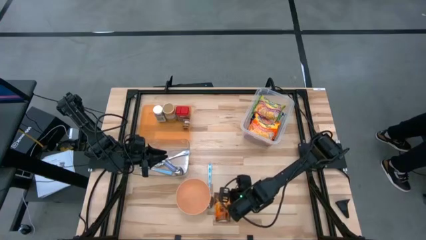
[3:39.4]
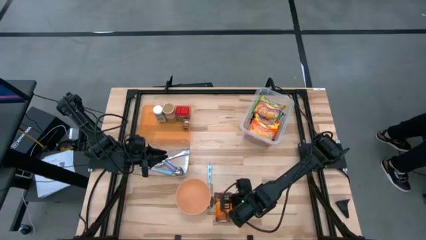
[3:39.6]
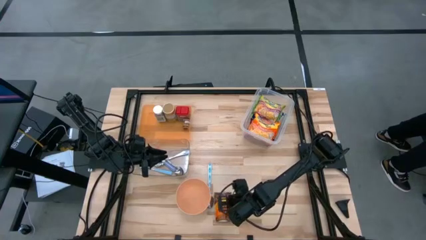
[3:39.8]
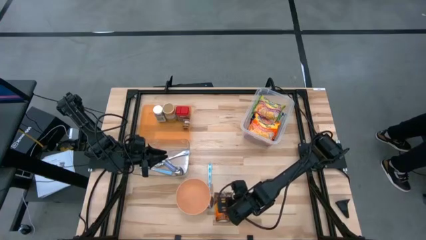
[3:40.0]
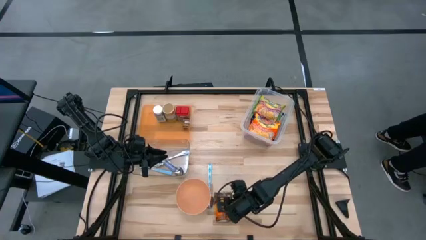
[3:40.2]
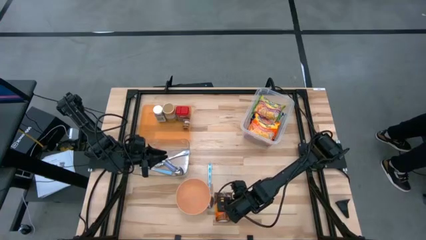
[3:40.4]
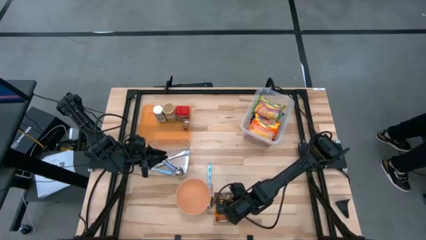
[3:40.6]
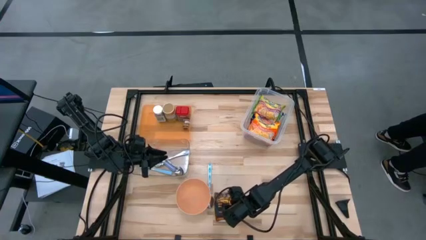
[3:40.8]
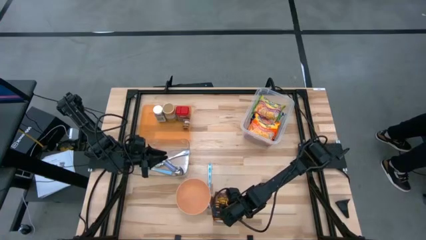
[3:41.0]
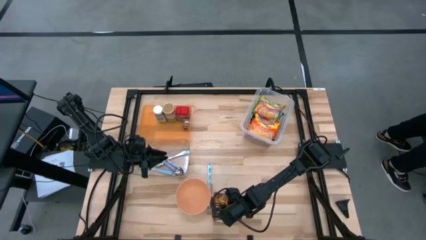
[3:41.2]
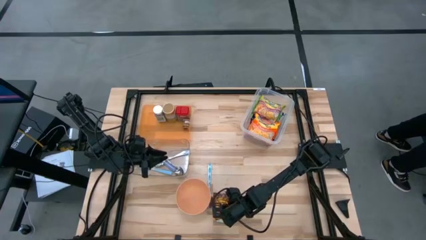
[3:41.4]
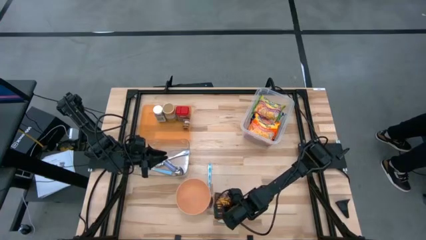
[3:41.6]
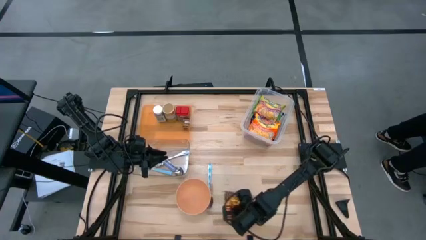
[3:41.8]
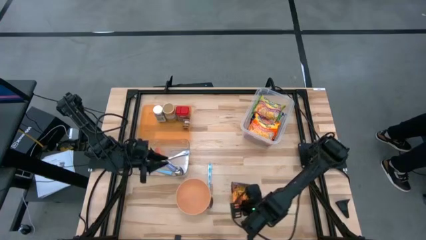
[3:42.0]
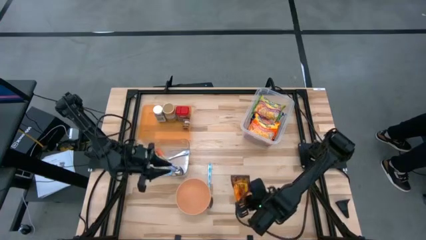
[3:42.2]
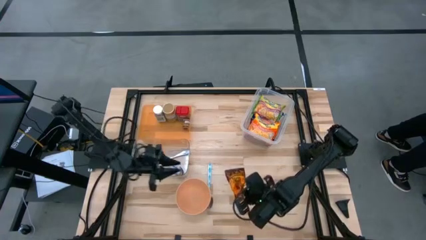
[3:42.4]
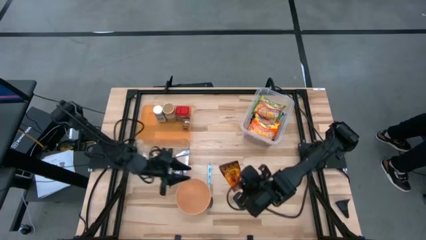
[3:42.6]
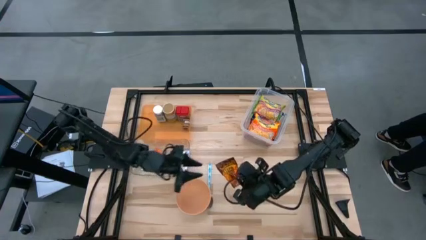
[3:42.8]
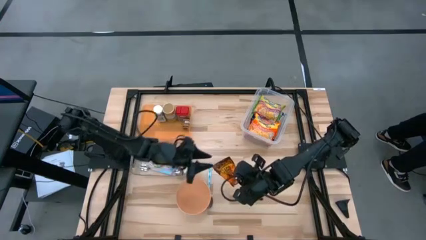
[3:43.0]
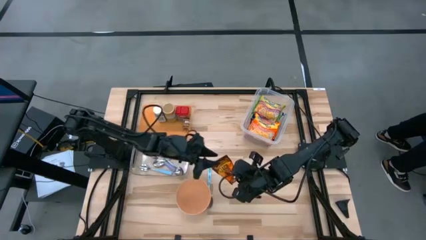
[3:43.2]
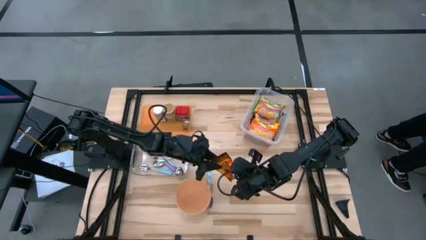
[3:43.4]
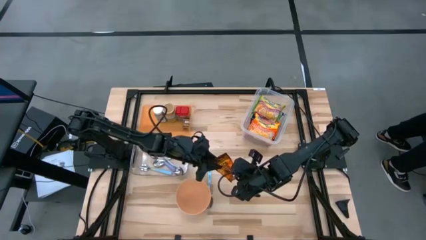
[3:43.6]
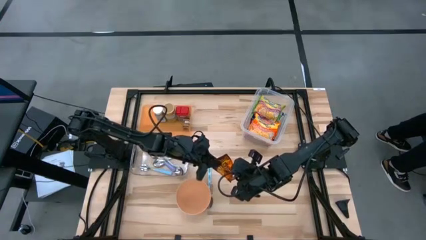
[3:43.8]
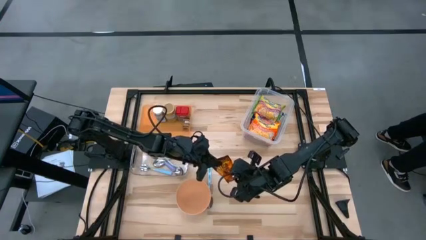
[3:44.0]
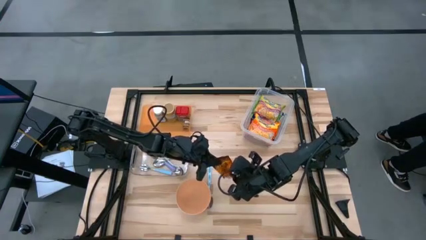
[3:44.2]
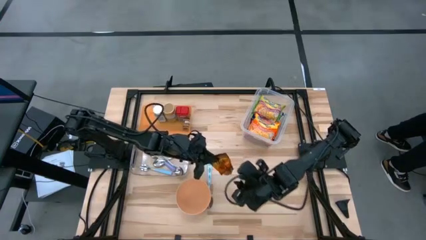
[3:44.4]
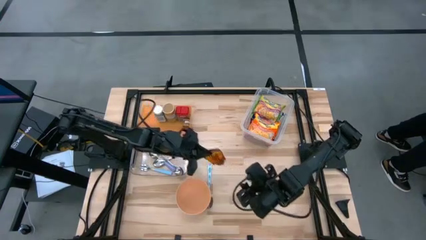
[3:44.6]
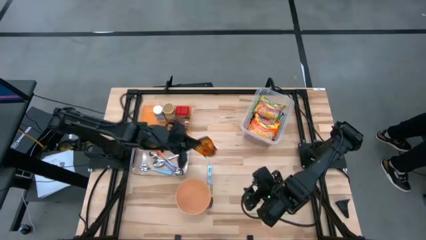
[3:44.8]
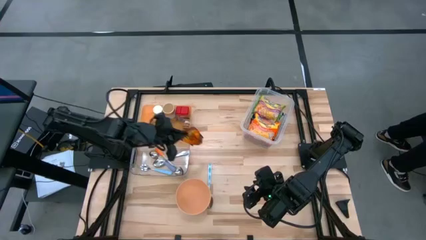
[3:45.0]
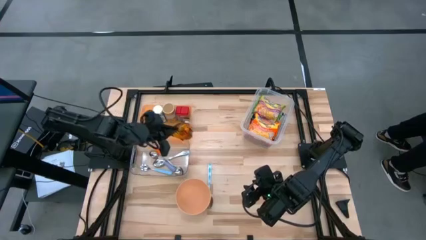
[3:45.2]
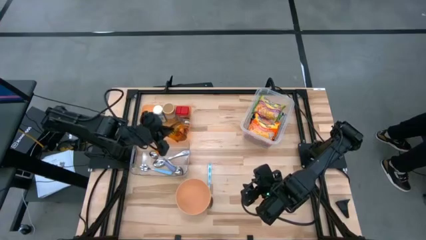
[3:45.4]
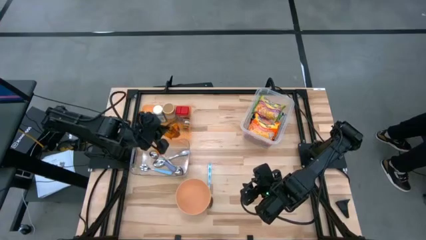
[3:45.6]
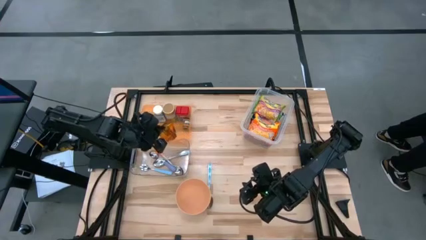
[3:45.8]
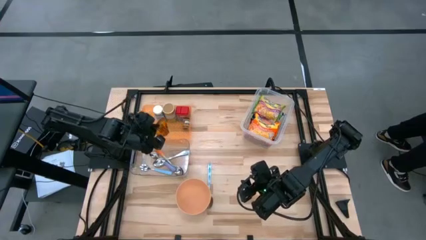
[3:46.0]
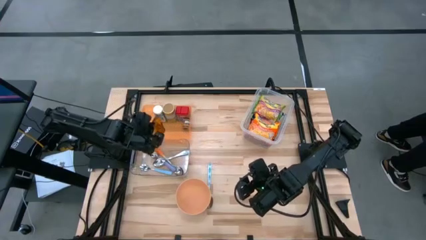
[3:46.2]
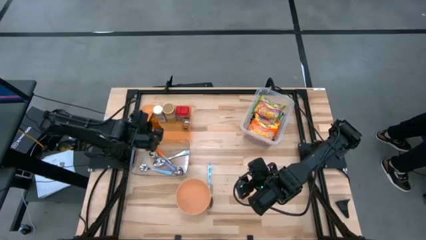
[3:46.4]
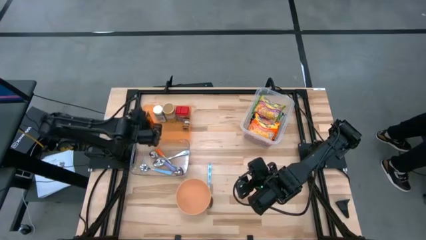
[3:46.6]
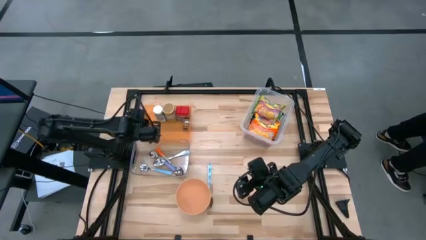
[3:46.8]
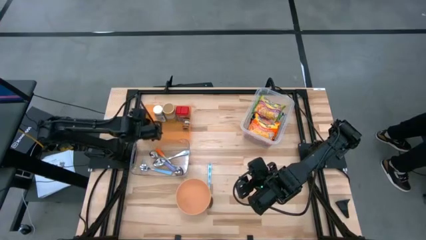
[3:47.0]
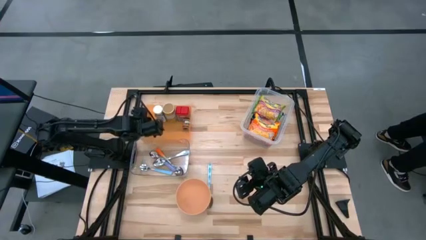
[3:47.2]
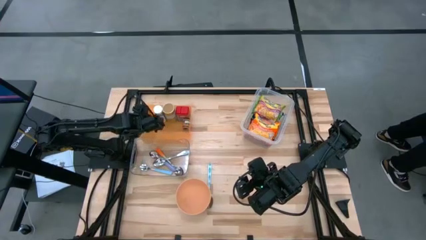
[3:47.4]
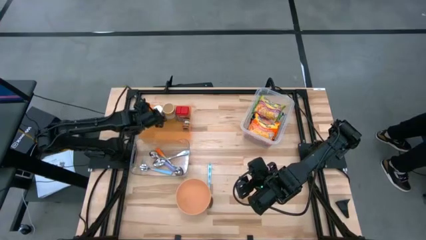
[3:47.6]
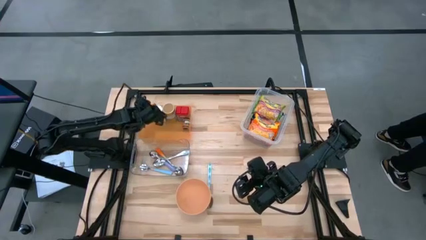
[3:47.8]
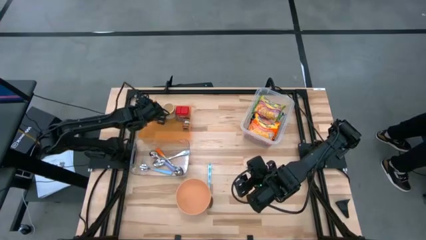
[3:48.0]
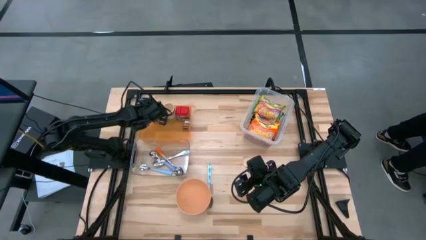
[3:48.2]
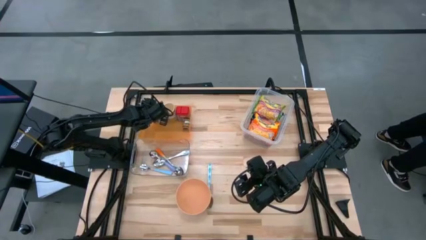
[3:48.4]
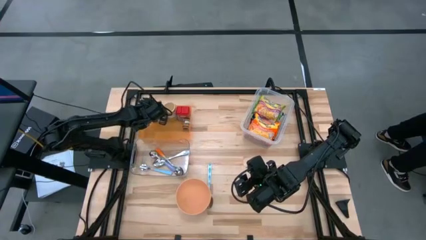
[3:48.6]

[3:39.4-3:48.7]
Task: Pick & Place Food Item
Put the orange seasoning bag into the orange bin
